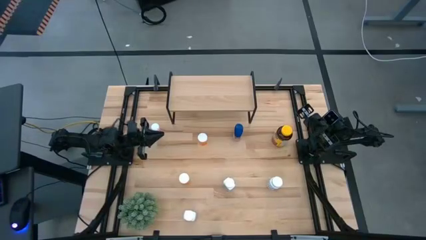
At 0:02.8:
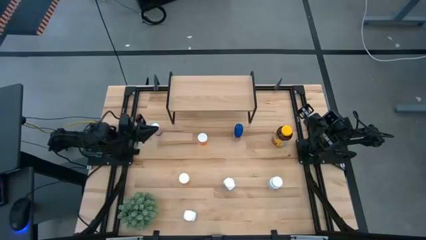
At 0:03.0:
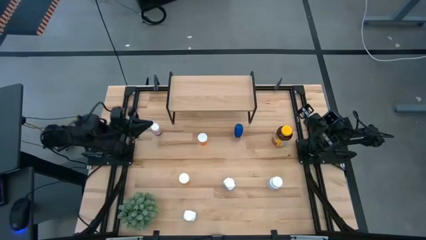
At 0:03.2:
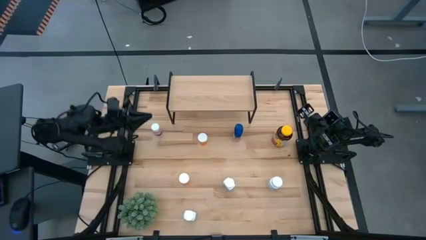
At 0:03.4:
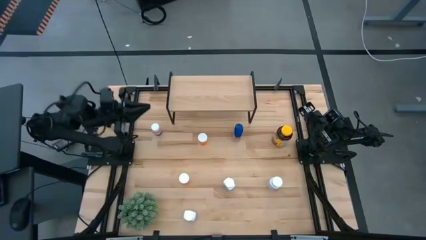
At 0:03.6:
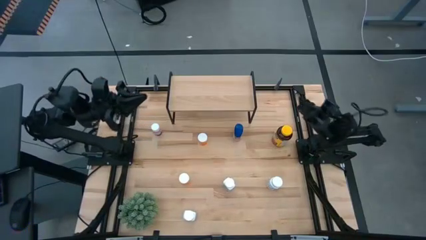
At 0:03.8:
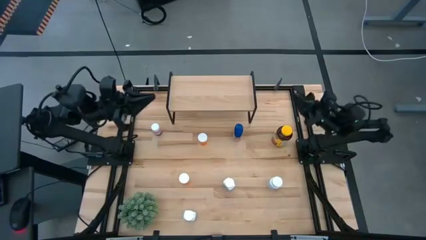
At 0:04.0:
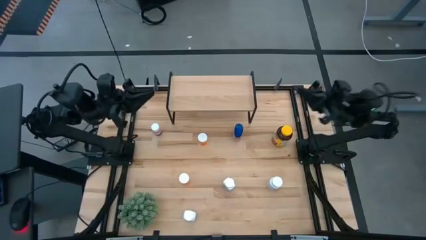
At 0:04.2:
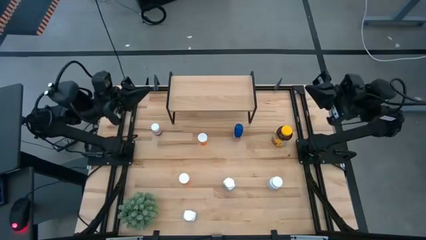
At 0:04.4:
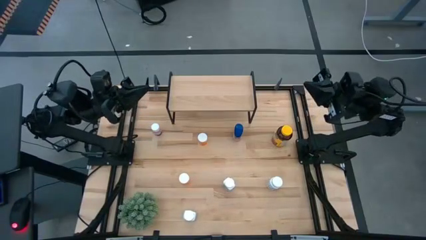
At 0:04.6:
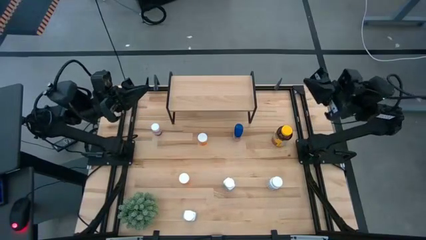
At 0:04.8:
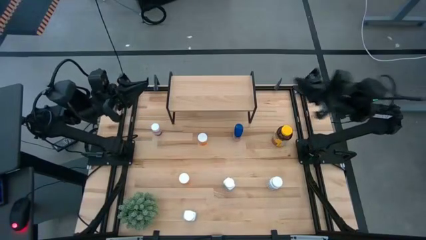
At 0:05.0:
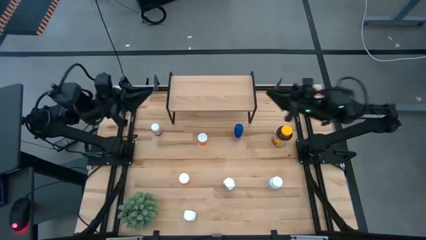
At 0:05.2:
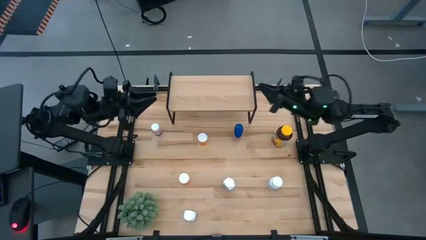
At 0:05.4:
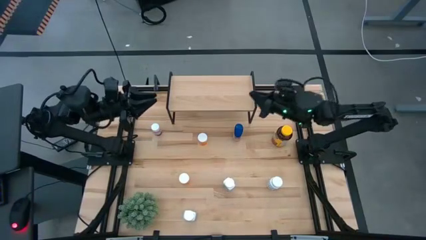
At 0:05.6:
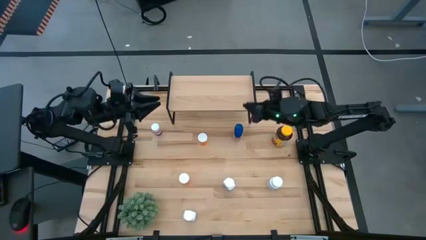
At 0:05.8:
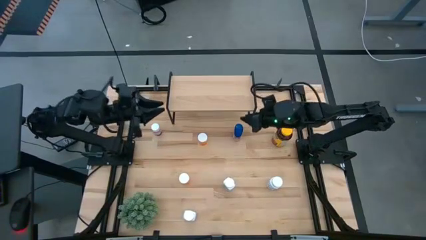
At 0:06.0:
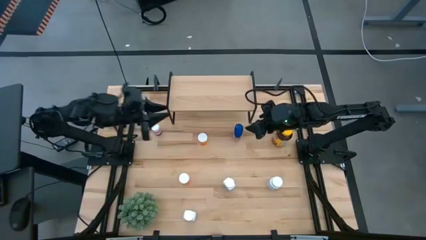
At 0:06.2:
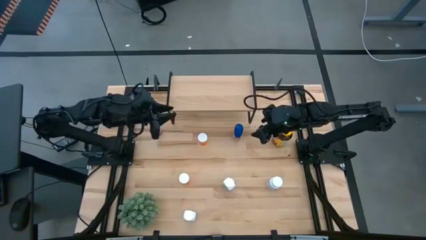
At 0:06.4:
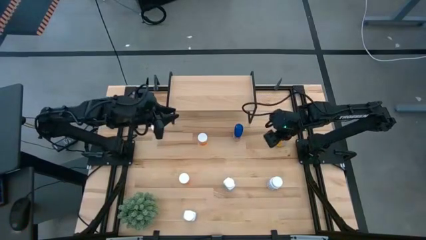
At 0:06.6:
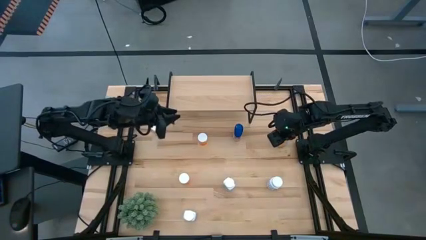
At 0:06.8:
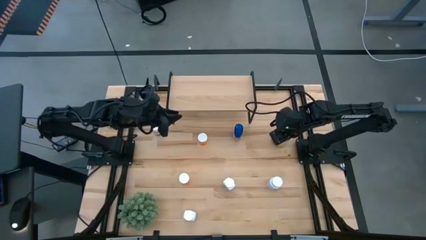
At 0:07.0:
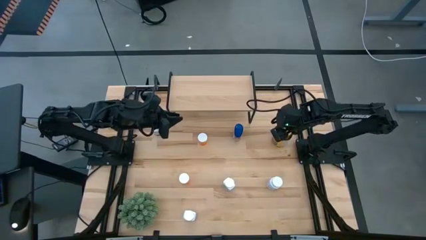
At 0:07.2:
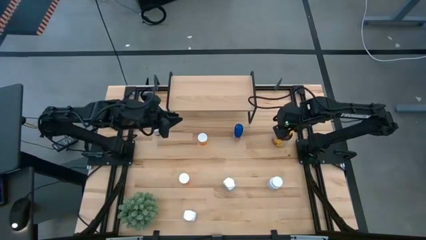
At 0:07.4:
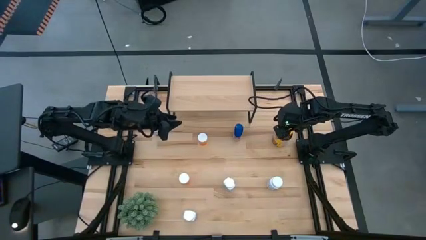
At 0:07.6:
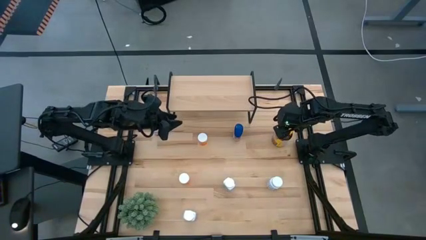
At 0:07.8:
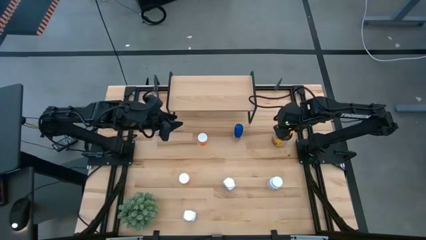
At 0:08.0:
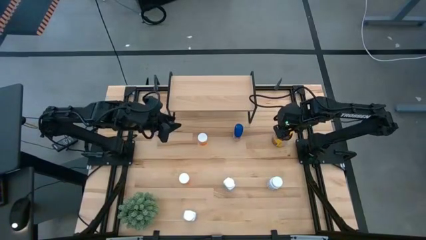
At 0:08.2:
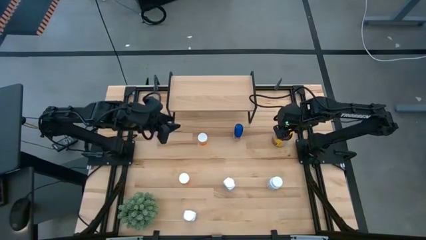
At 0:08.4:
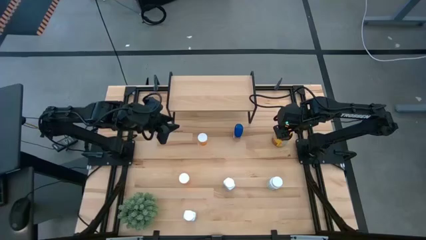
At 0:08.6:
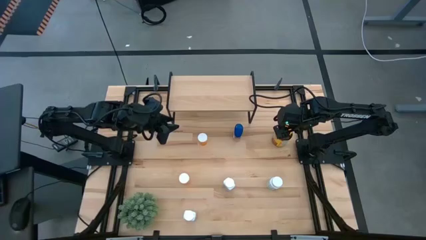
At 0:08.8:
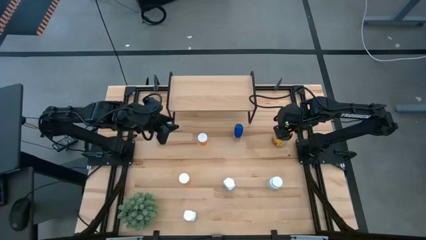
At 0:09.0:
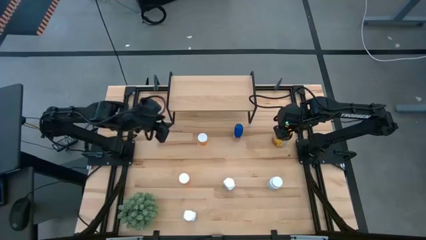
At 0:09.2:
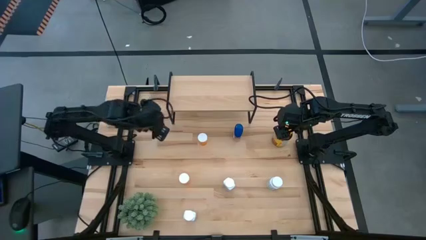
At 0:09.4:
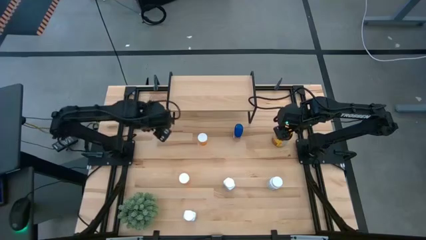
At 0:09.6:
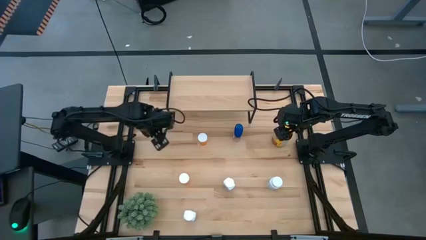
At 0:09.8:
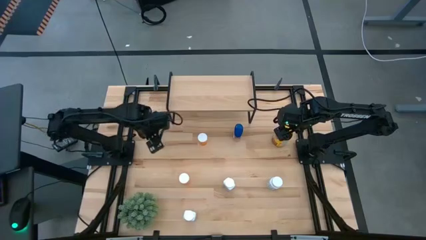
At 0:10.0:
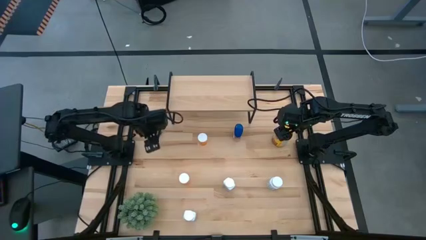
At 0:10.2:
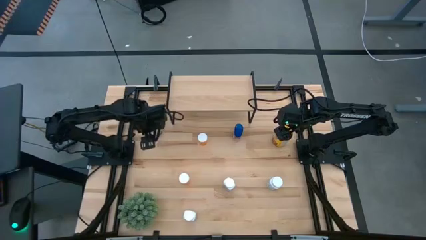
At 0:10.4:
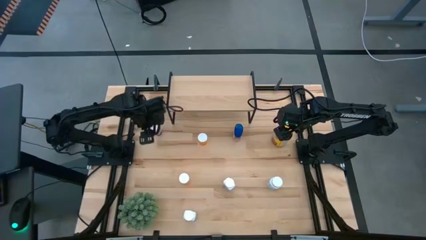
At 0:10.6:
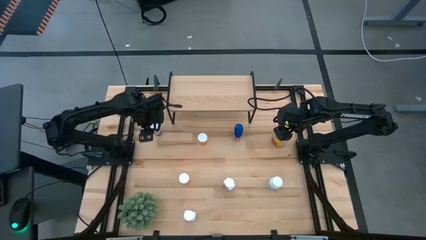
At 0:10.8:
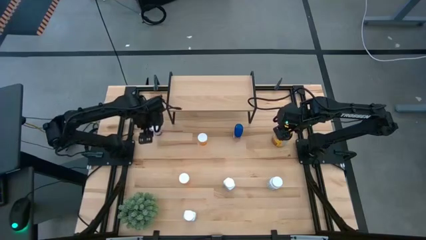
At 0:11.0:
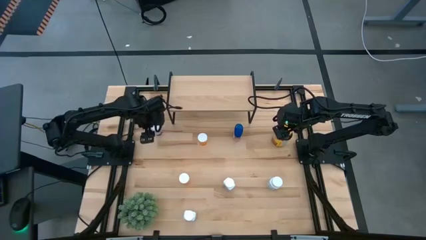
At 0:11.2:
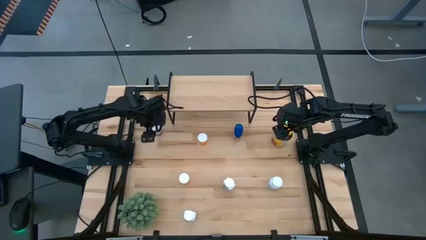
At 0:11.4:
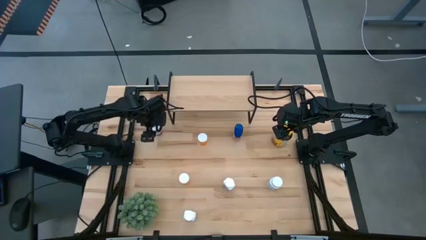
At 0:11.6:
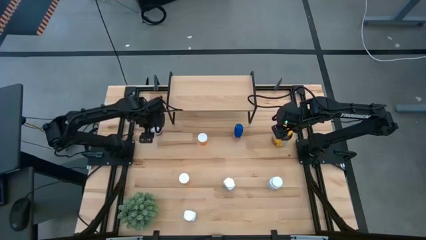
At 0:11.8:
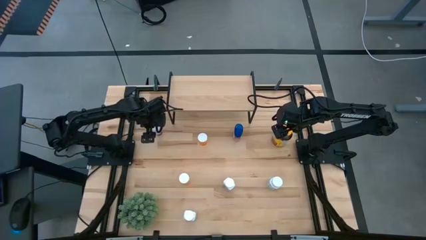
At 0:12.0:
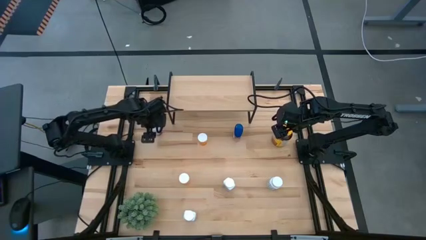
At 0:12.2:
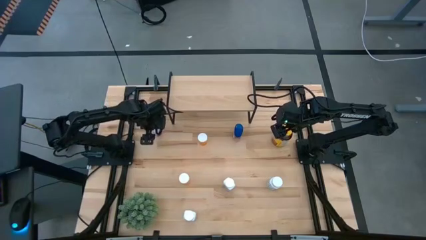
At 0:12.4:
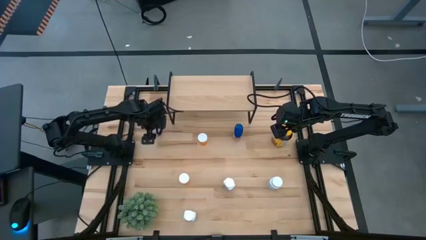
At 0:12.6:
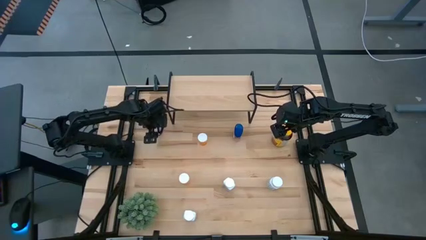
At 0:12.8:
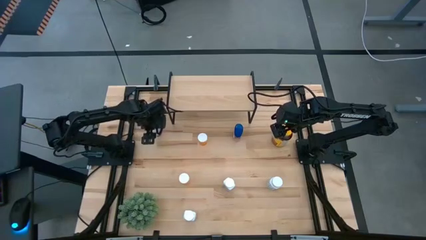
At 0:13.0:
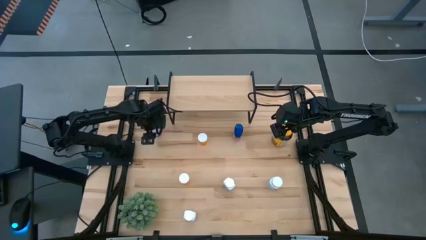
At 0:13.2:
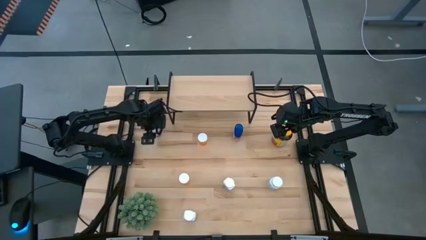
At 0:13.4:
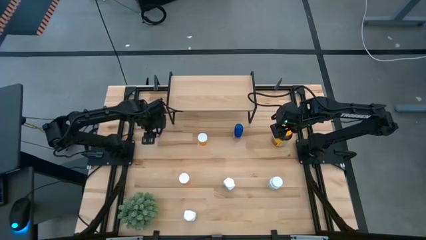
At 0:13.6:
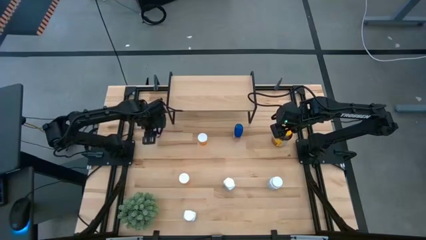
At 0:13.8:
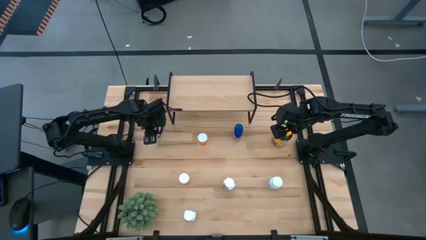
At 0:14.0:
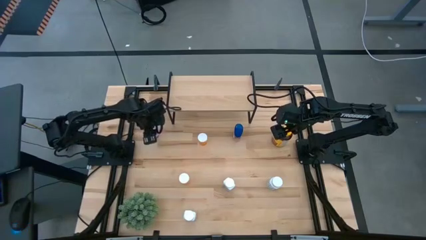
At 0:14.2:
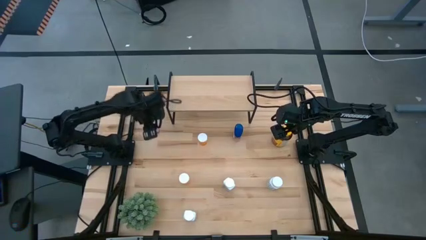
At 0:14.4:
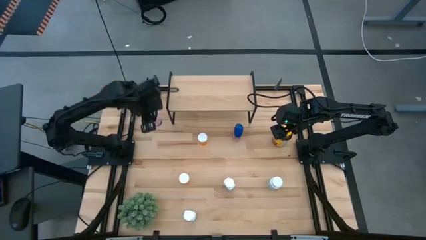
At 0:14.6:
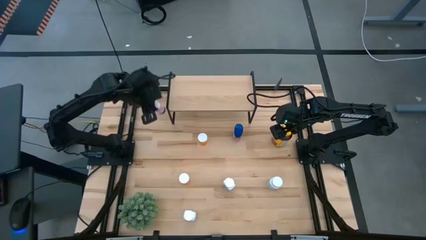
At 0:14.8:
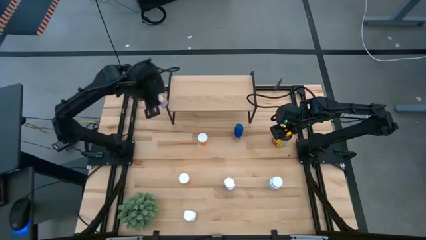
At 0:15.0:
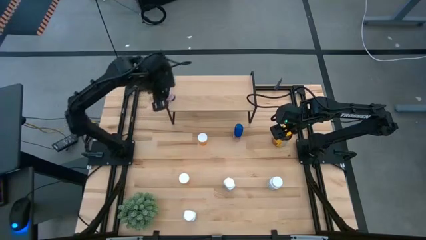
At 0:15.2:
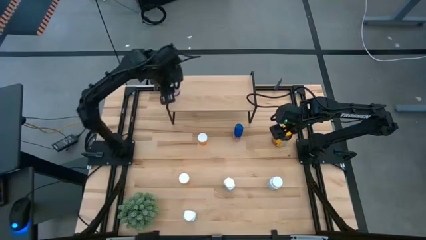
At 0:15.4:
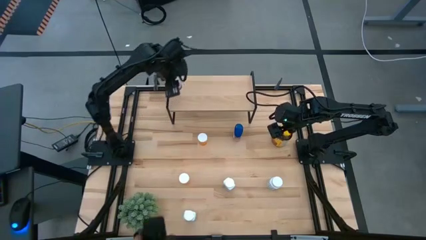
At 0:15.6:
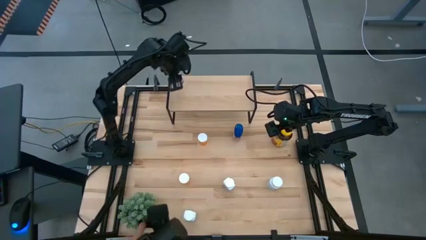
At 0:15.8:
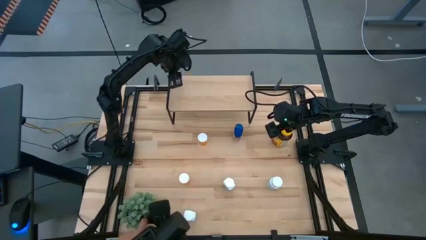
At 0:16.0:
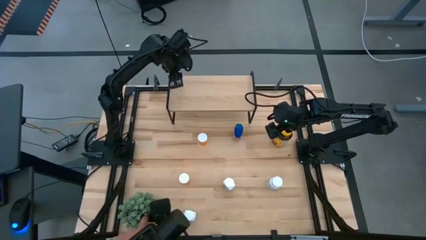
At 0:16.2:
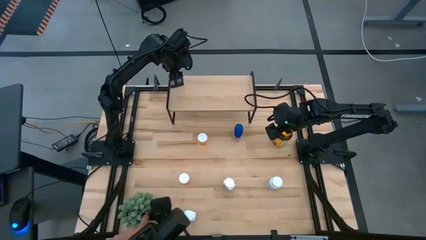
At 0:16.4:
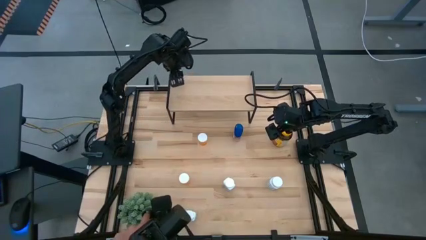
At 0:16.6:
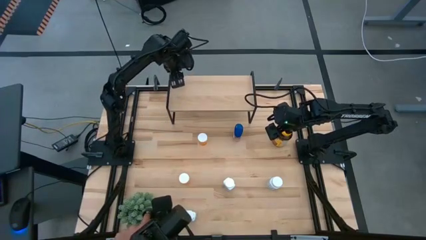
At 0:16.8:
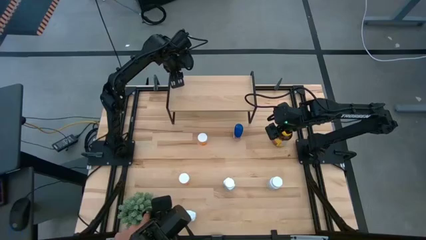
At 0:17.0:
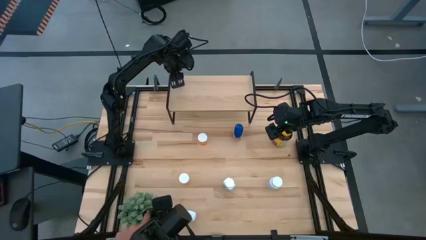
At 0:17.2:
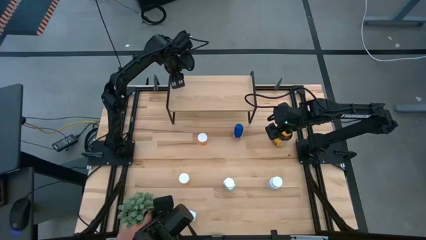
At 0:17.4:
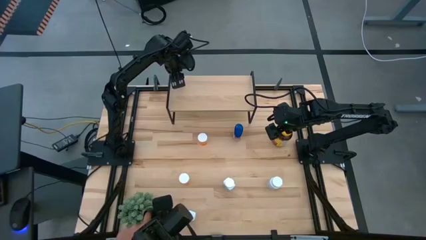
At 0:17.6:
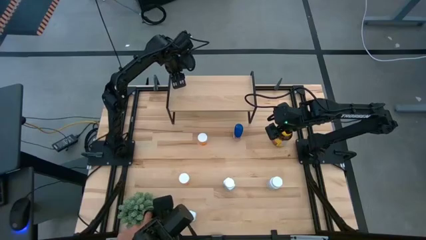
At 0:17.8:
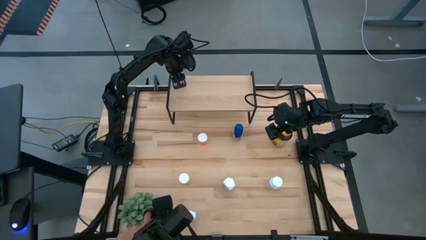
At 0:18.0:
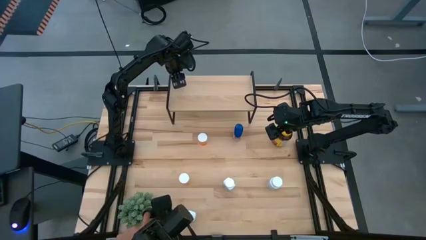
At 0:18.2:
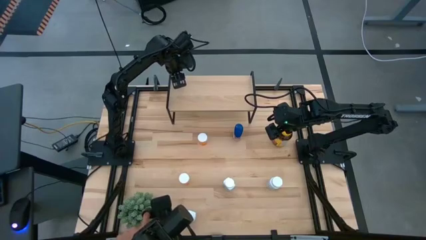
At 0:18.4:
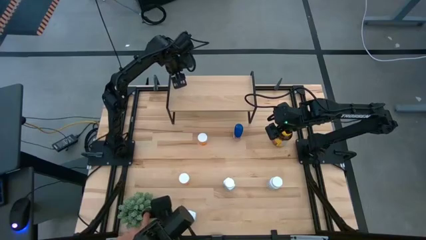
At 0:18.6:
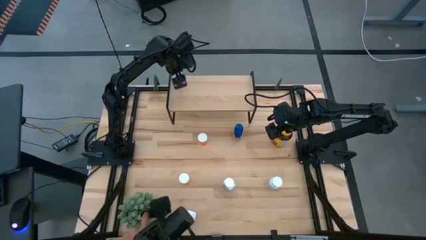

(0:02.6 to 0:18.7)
Task: Pick and place medicine bottles onto shelf by color
Put the pink medicine bottle on the shelf
